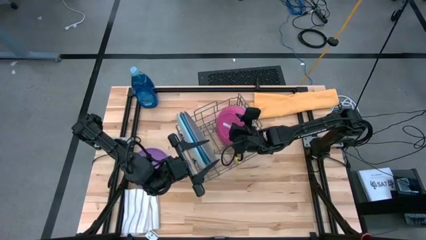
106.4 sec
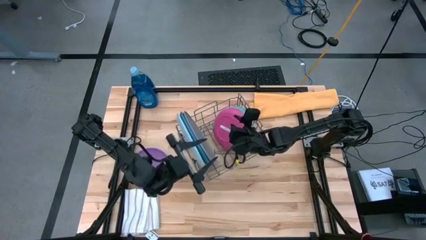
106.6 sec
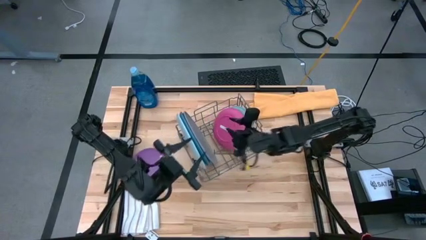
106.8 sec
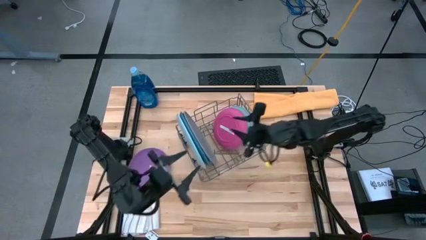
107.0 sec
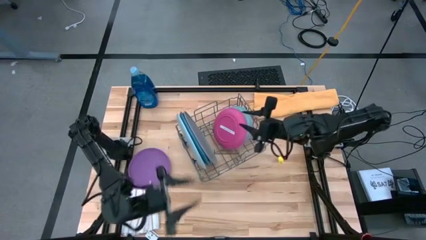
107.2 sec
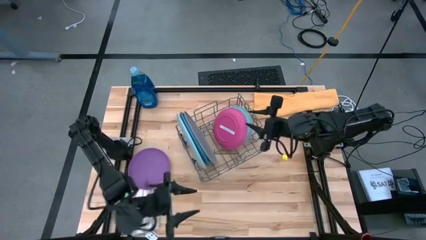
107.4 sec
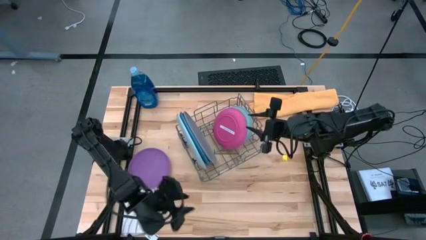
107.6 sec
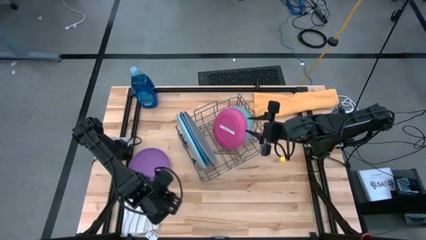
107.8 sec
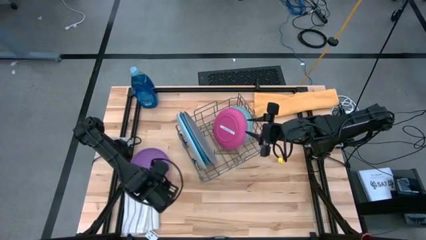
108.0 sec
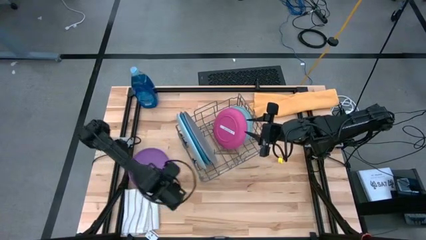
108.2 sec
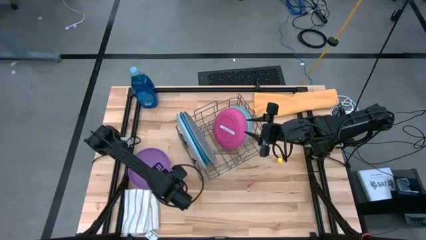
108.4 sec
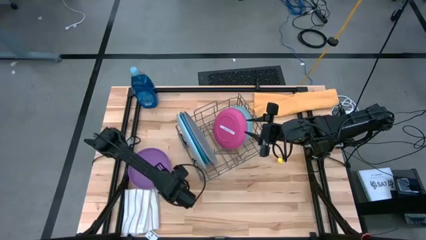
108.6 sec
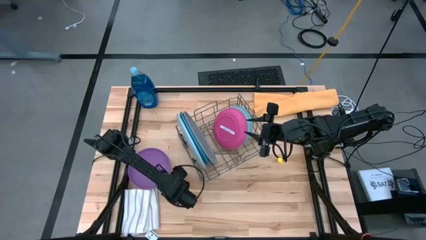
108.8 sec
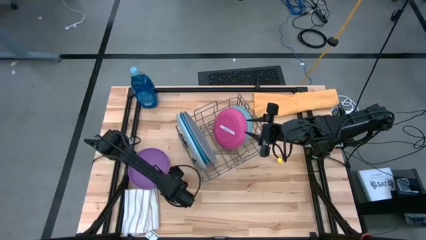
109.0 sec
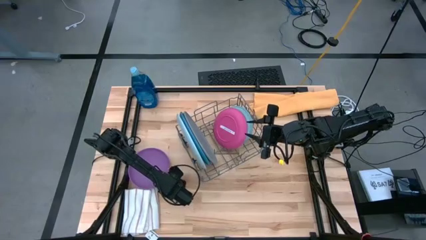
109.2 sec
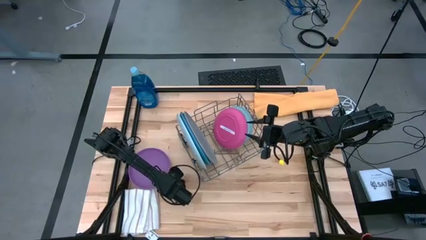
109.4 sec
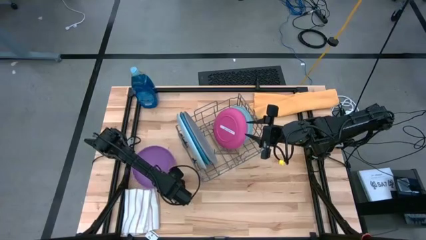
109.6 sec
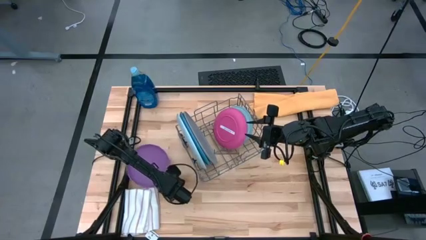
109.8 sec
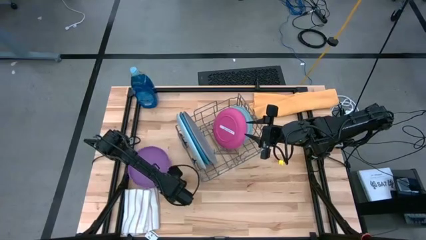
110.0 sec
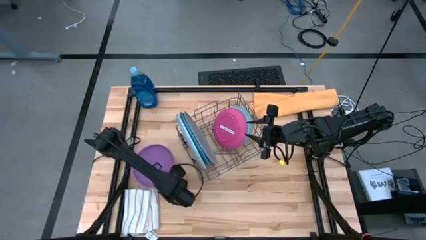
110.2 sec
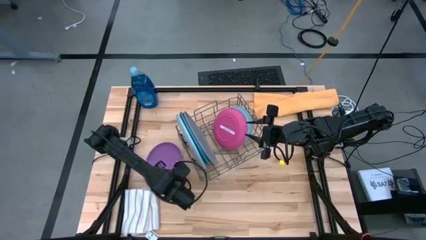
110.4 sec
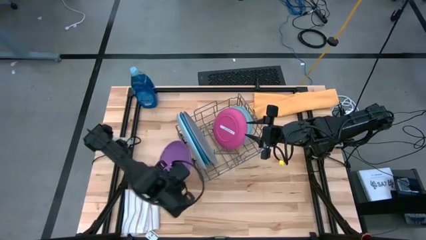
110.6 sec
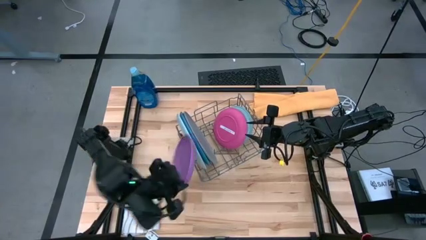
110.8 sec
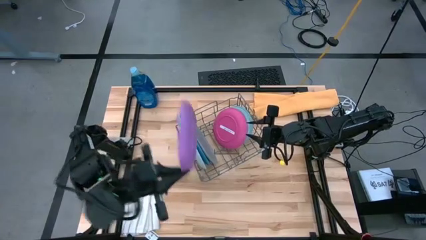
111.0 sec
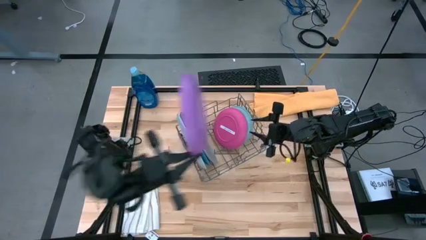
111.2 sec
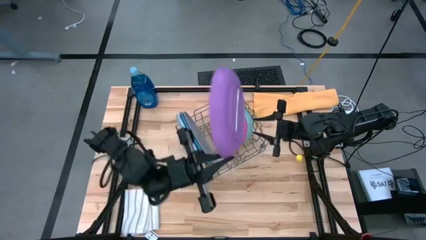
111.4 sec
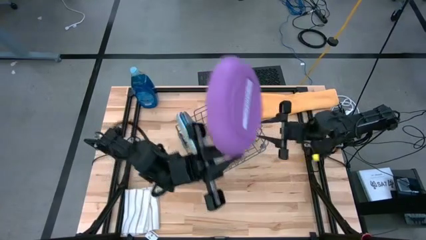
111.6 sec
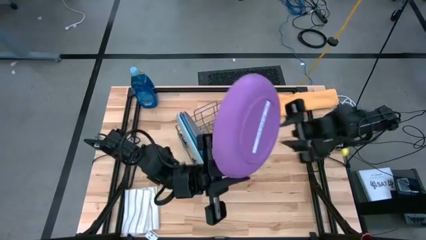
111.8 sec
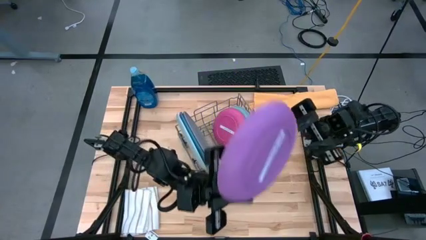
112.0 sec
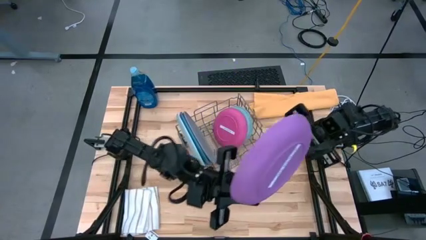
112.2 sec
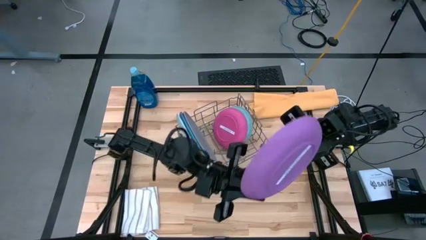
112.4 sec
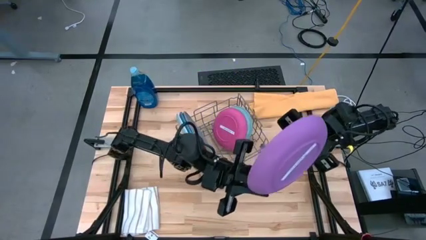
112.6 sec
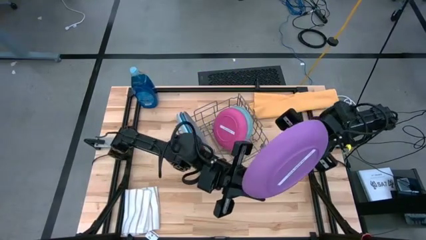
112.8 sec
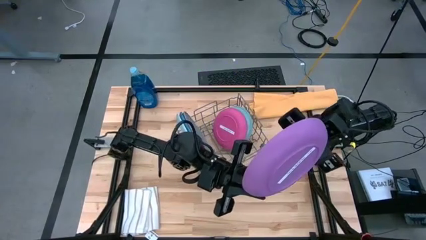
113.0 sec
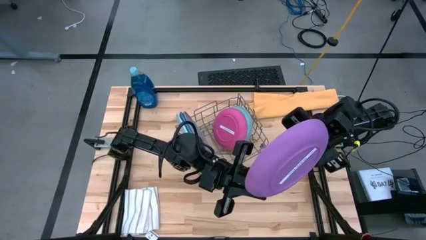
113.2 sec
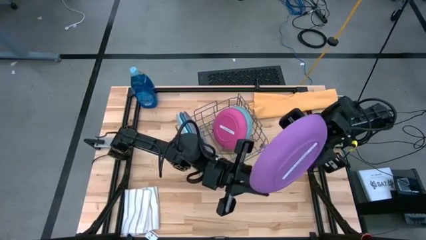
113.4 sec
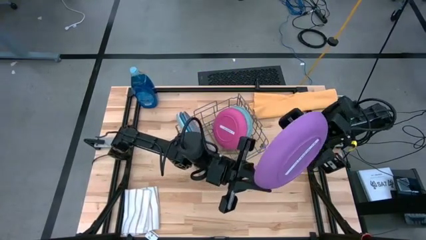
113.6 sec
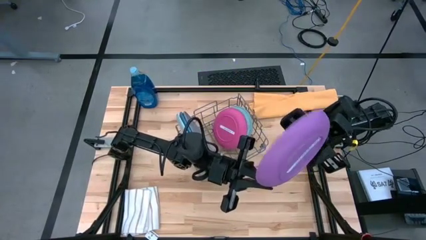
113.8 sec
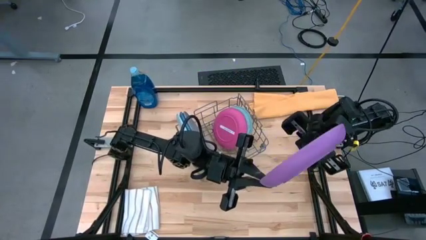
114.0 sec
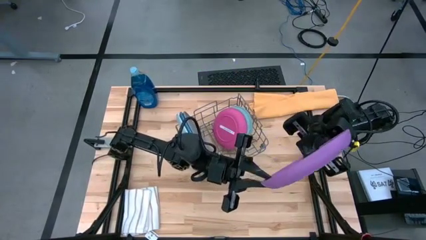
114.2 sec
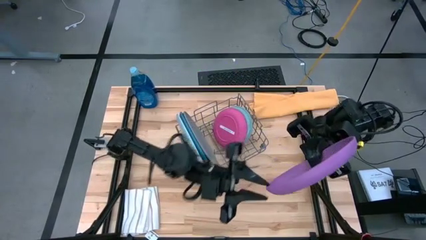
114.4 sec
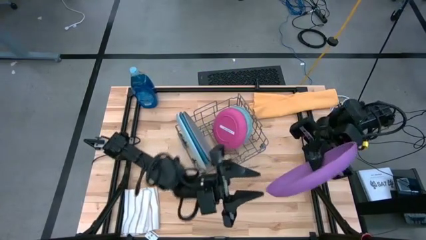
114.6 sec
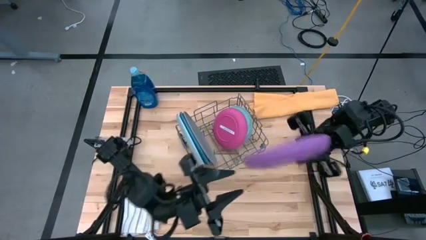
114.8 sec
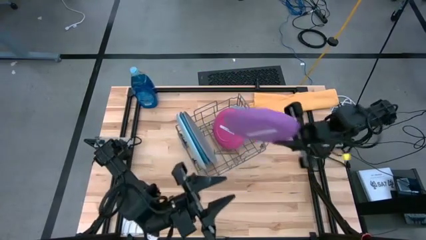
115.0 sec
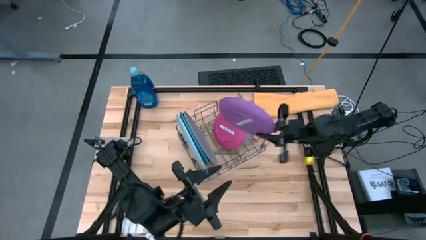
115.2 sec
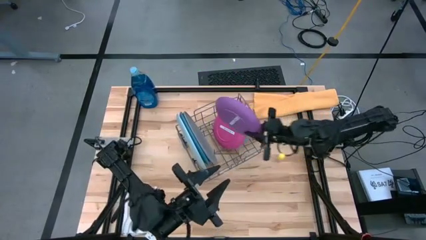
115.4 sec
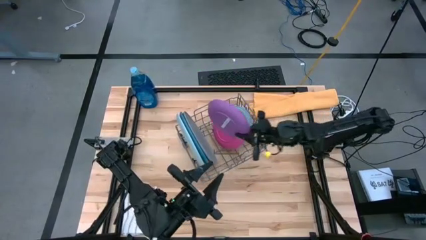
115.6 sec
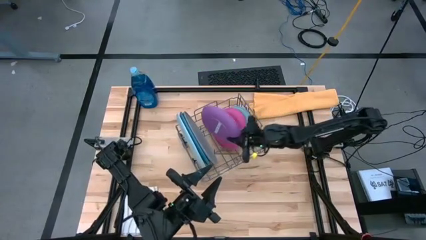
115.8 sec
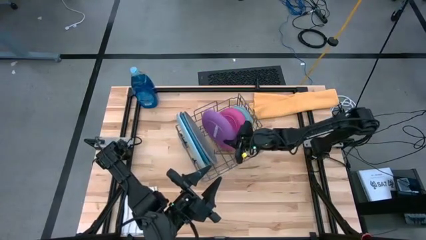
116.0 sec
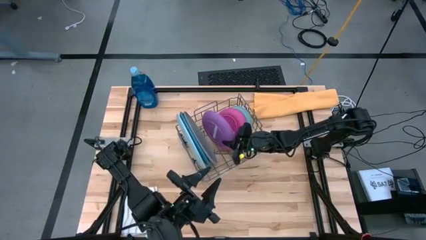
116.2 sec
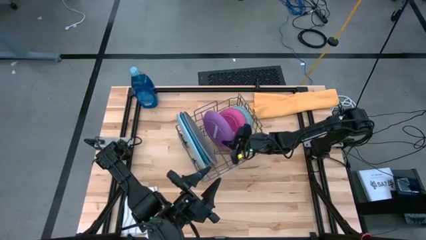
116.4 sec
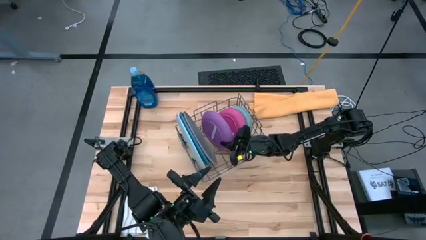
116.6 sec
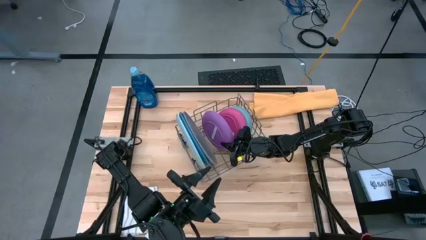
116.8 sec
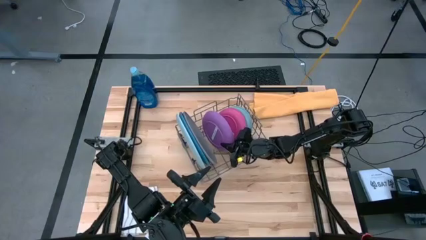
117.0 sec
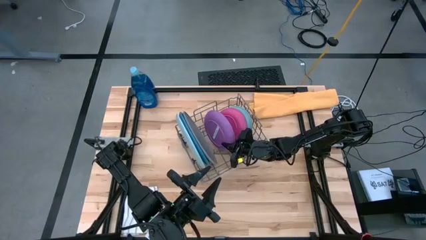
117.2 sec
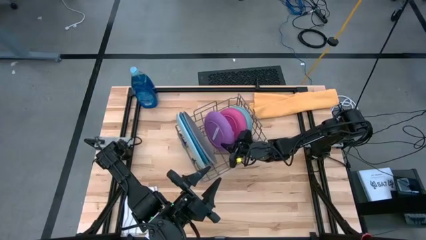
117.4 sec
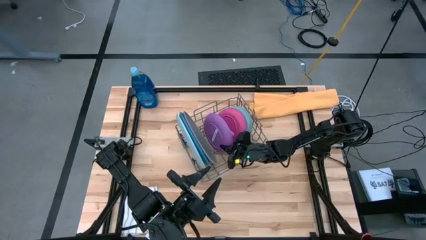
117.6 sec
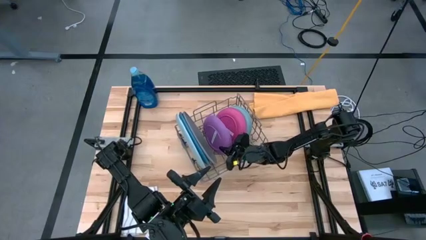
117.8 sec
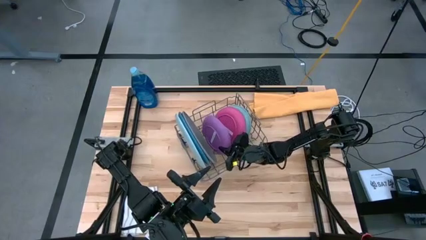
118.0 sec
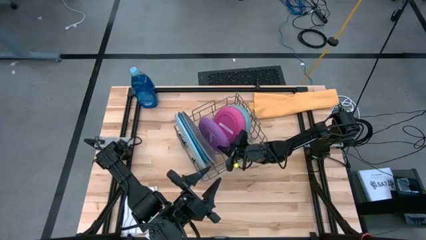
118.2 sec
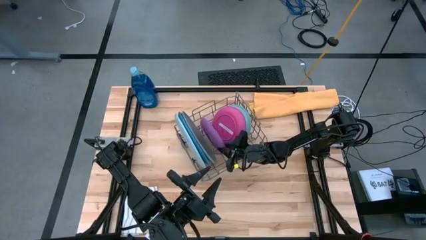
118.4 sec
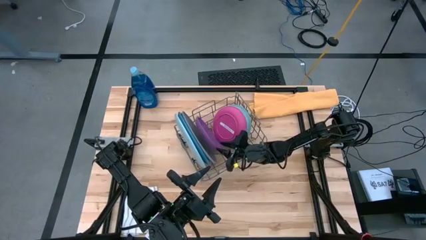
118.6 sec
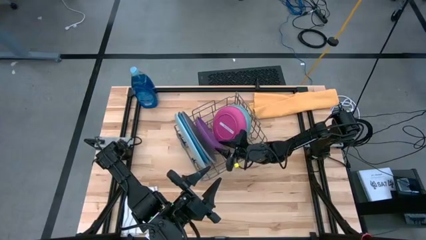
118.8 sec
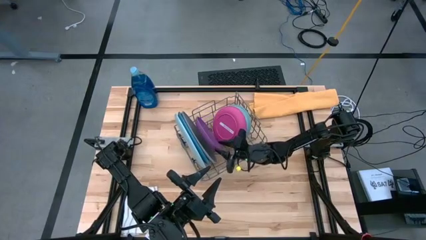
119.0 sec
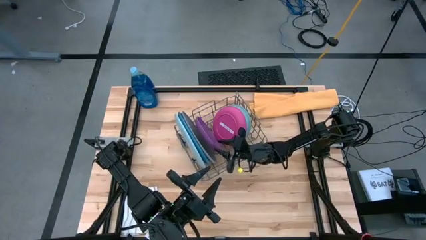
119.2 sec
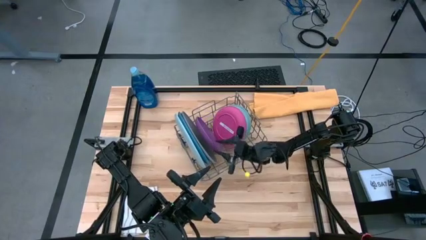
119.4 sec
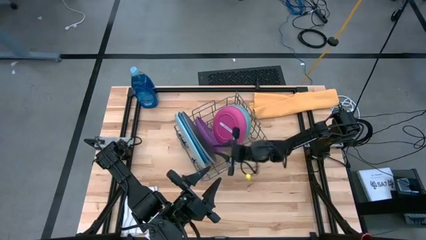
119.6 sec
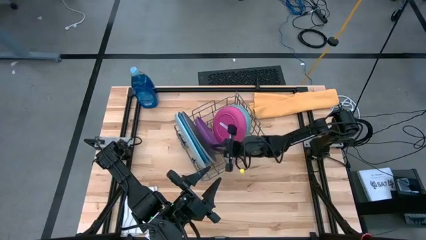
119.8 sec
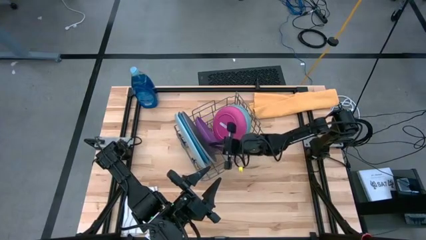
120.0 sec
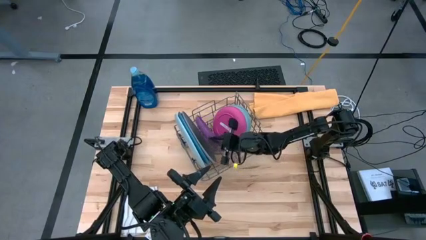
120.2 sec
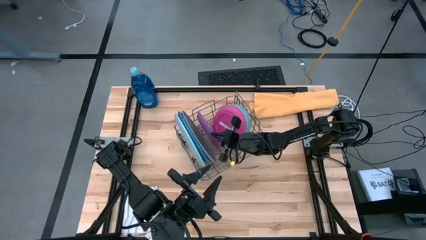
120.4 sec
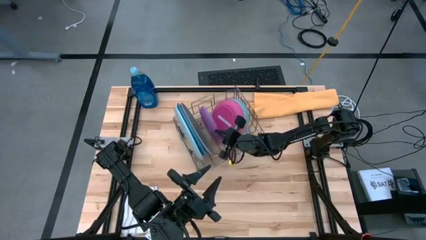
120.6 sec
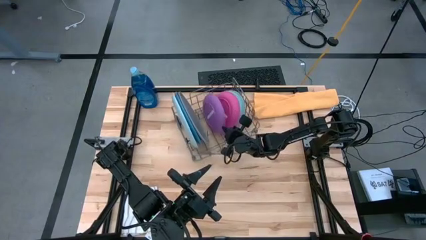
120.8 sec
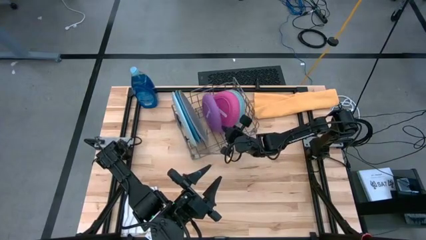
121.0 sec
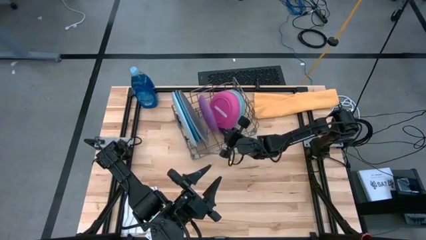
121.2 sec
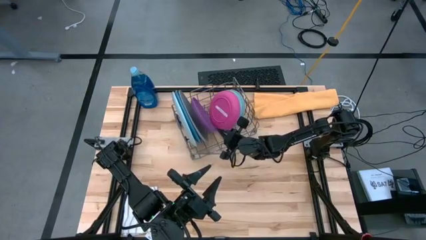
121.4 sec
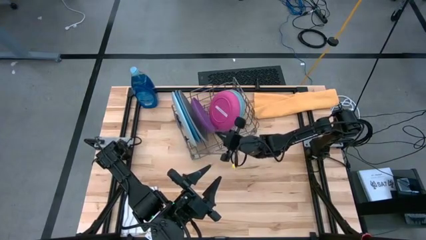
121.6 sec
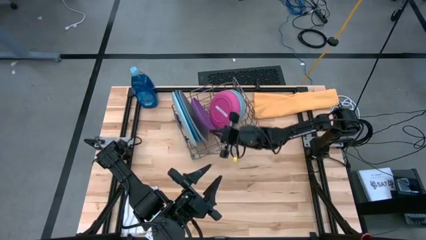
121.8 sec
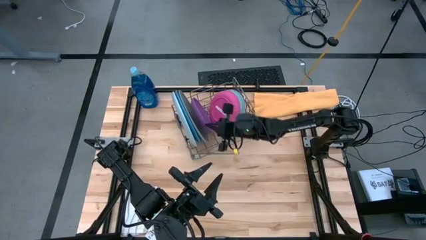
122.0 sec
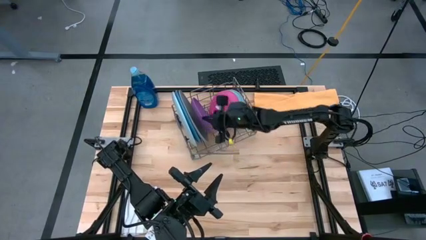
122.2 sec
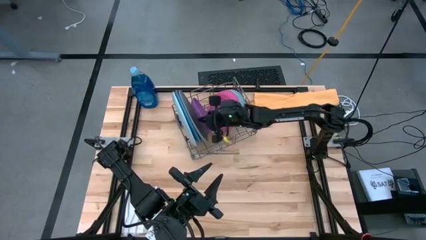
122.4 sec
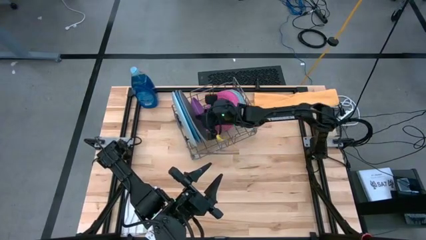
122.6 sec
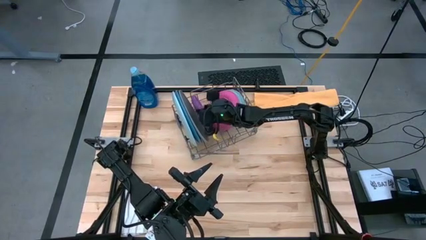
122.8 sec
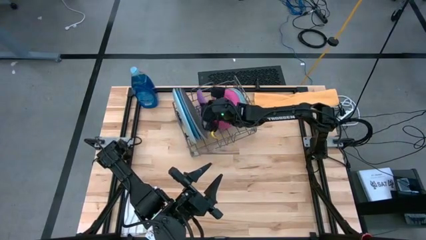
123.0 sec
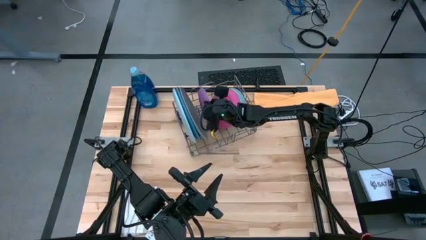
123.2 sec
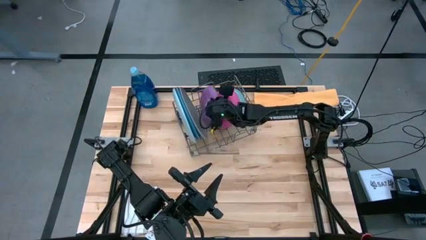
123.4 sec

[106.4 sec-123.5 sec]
Task: Sort dishes
Put the purple plate into the dish rack
